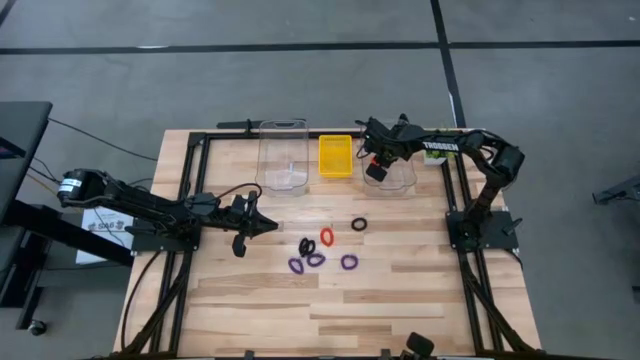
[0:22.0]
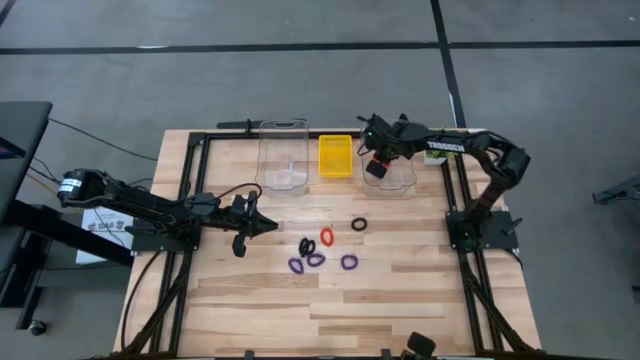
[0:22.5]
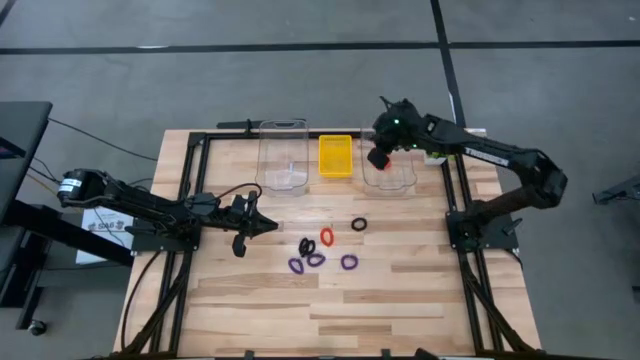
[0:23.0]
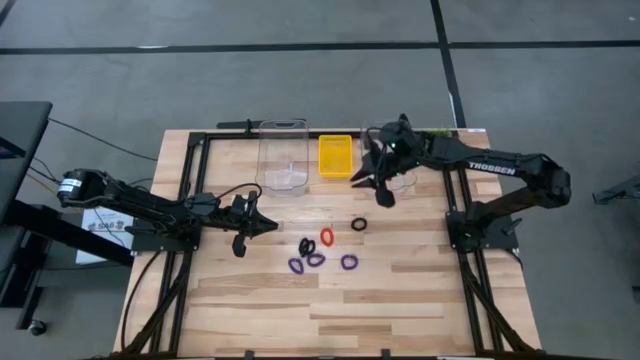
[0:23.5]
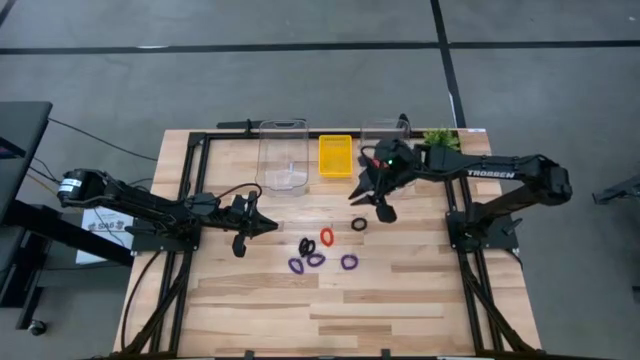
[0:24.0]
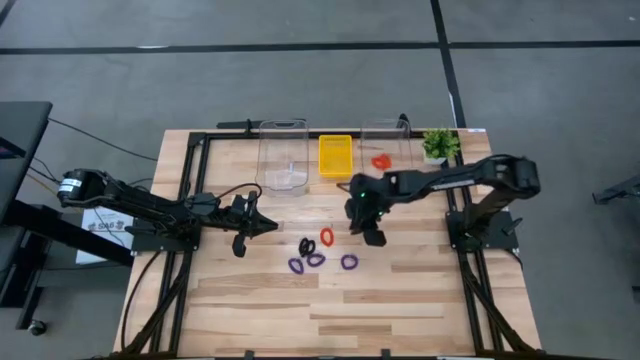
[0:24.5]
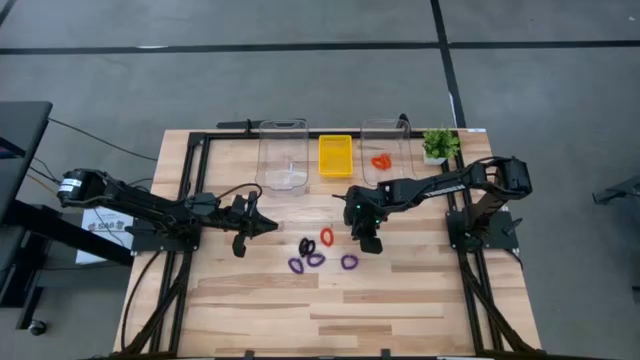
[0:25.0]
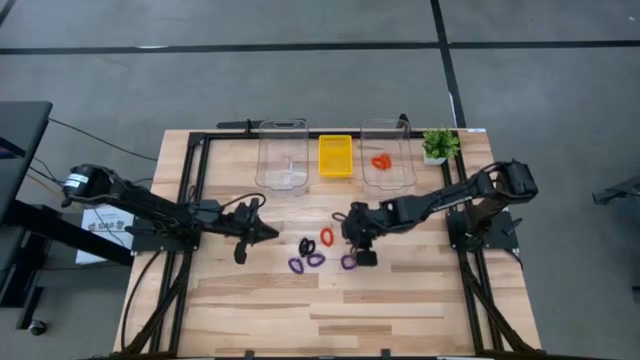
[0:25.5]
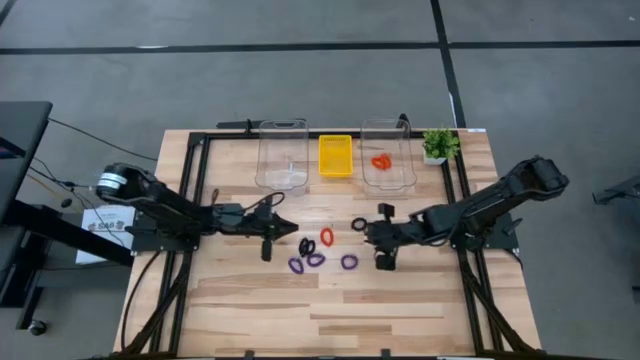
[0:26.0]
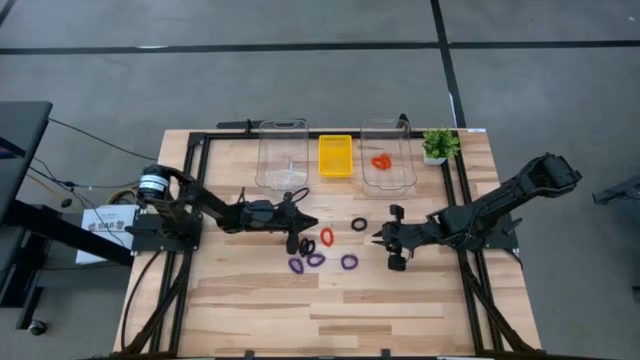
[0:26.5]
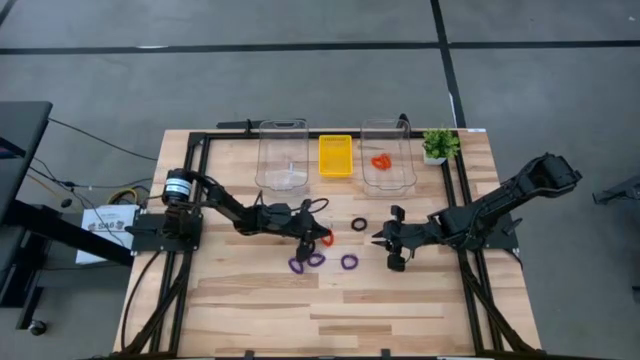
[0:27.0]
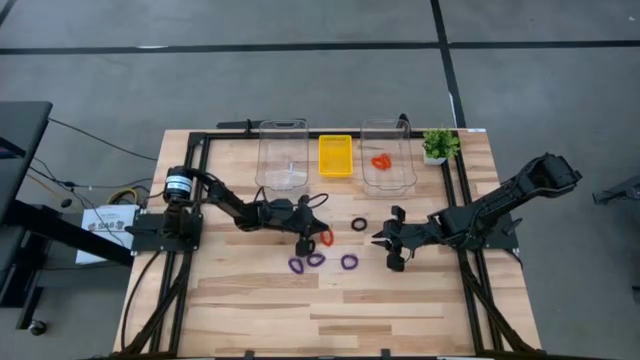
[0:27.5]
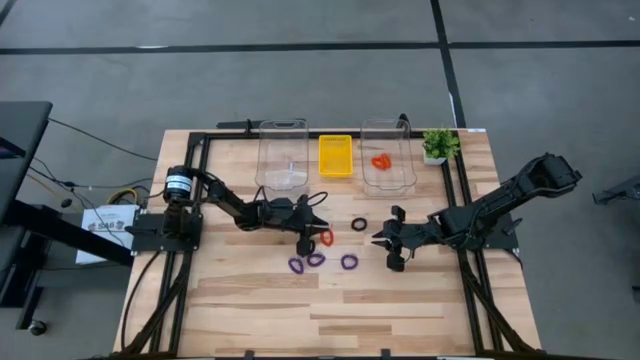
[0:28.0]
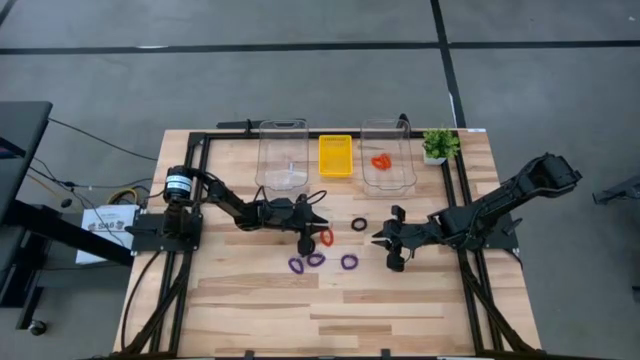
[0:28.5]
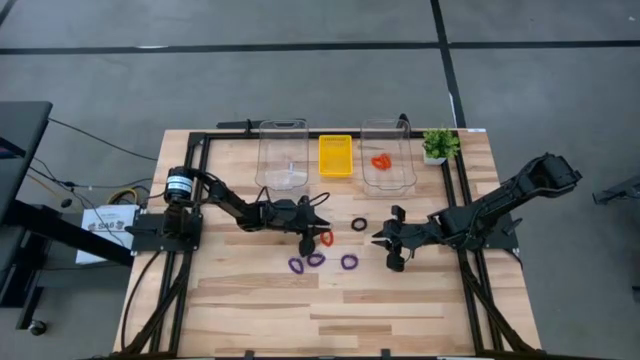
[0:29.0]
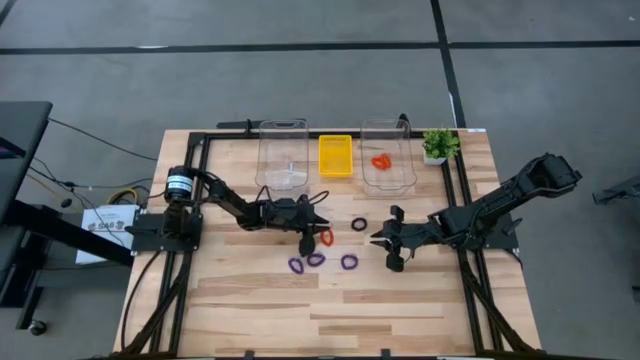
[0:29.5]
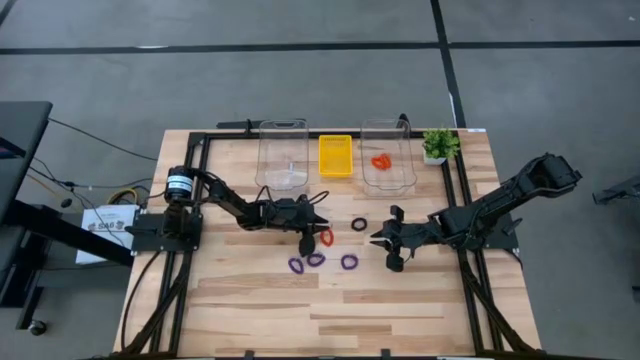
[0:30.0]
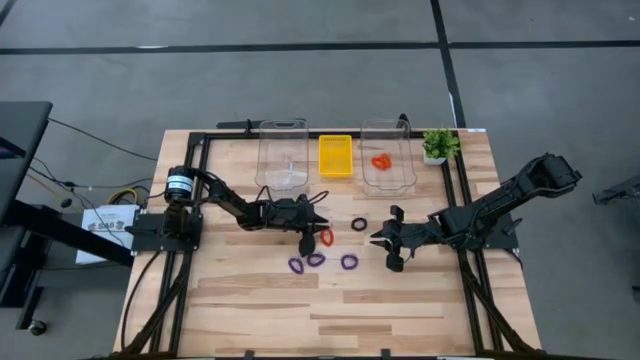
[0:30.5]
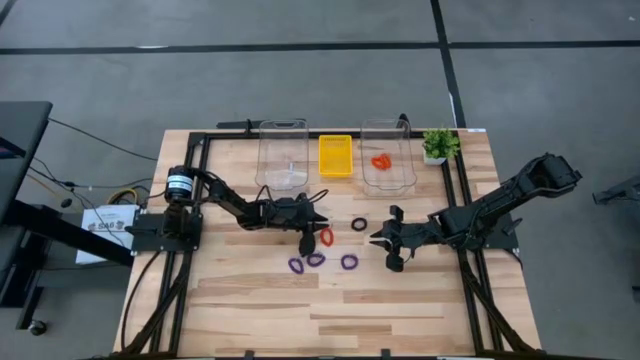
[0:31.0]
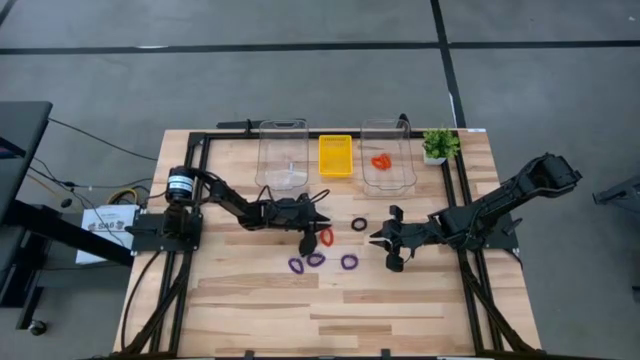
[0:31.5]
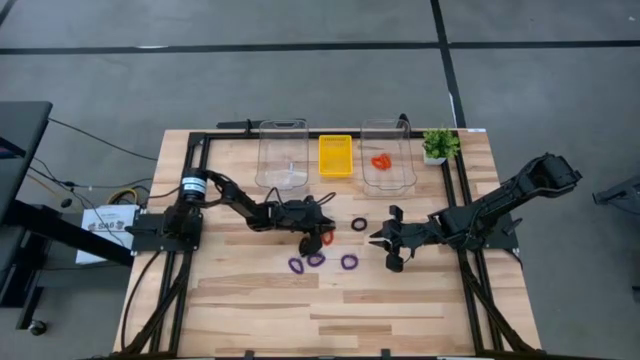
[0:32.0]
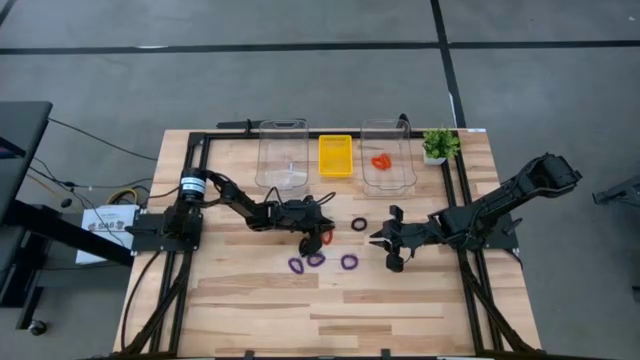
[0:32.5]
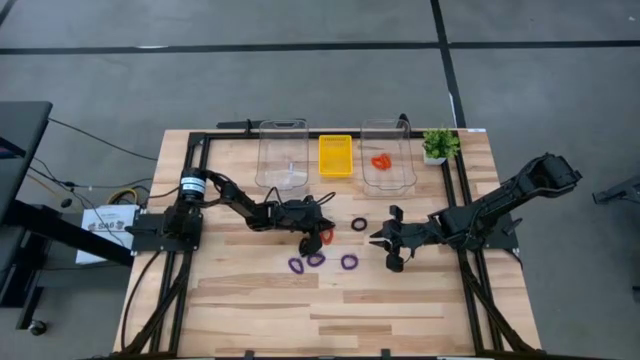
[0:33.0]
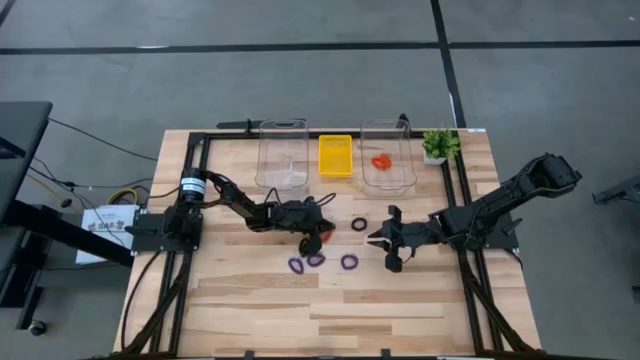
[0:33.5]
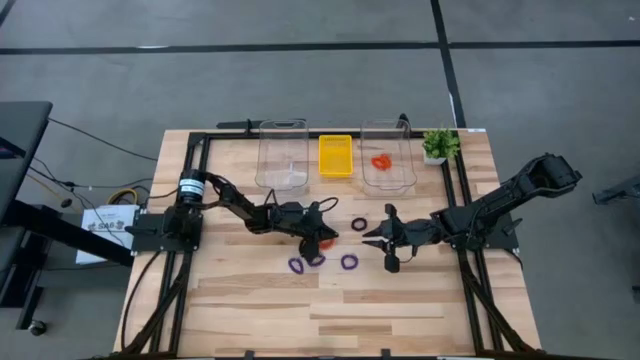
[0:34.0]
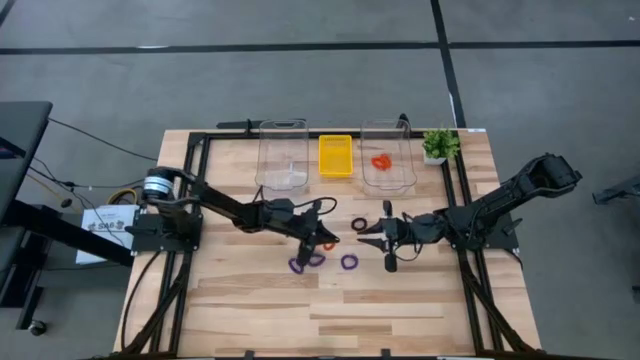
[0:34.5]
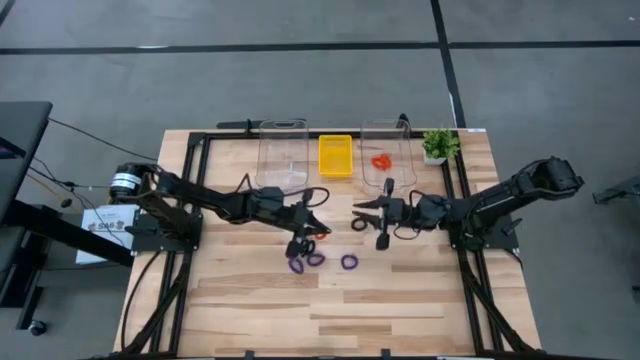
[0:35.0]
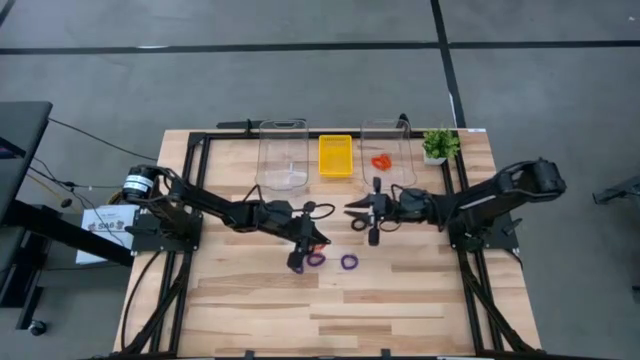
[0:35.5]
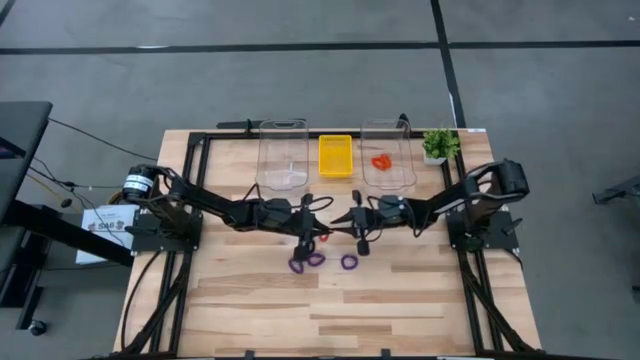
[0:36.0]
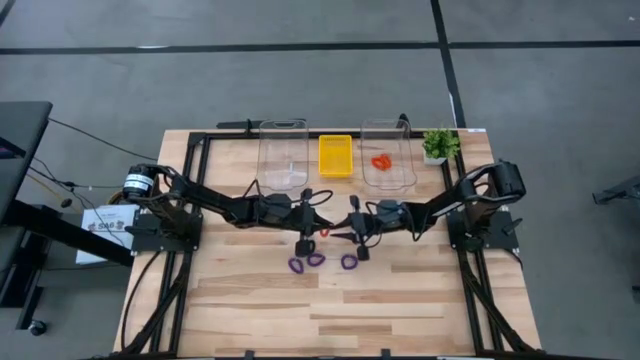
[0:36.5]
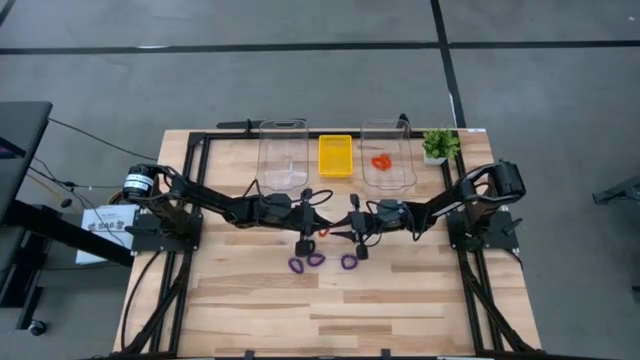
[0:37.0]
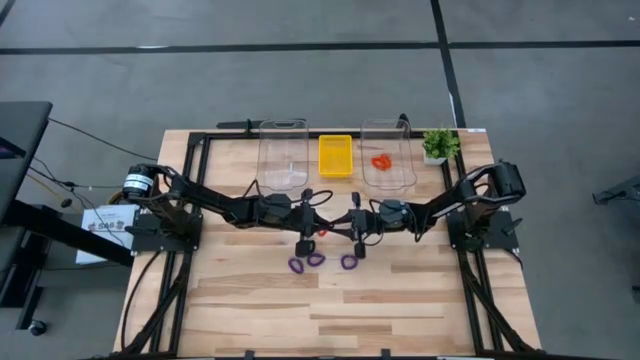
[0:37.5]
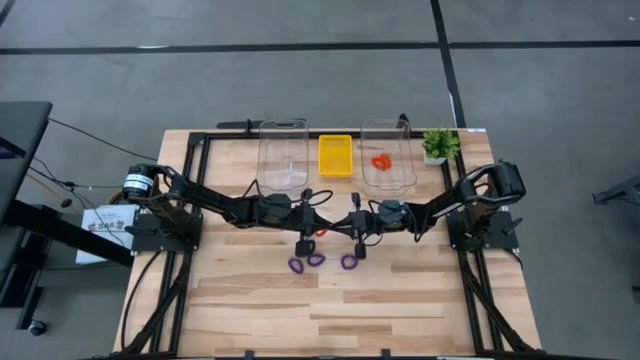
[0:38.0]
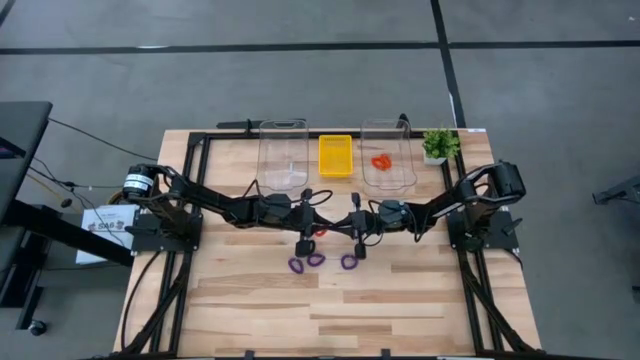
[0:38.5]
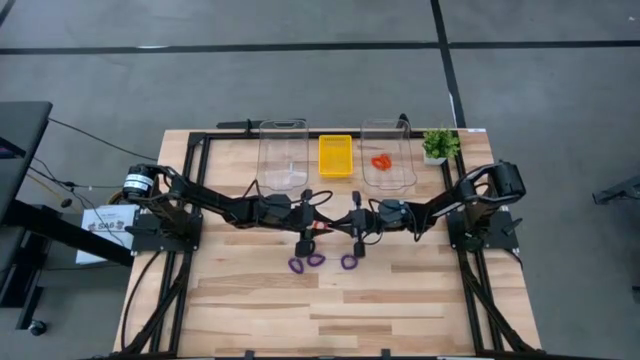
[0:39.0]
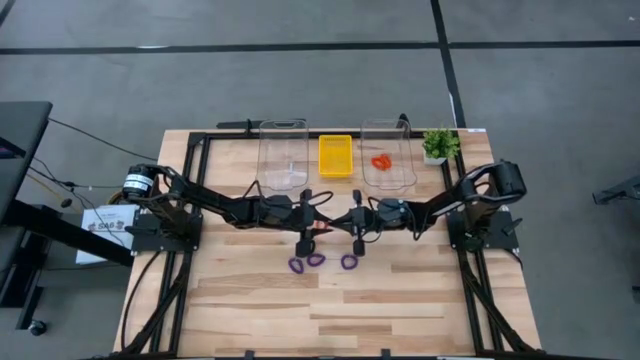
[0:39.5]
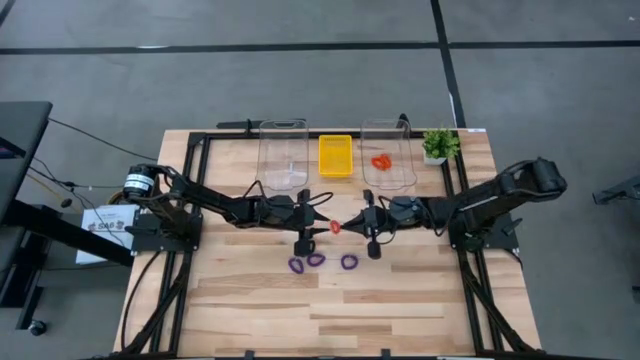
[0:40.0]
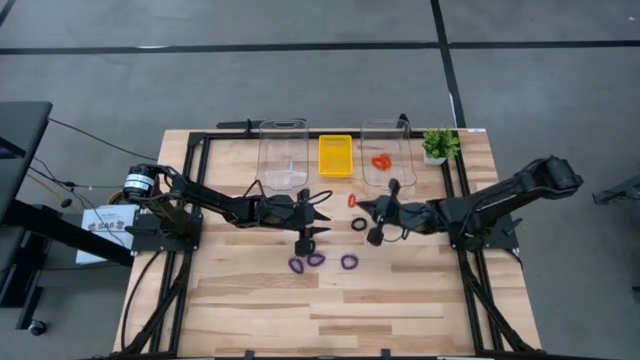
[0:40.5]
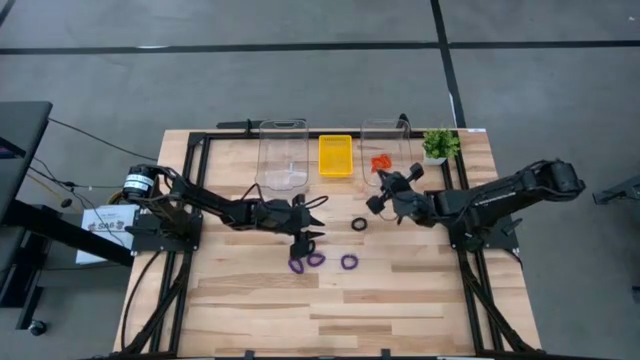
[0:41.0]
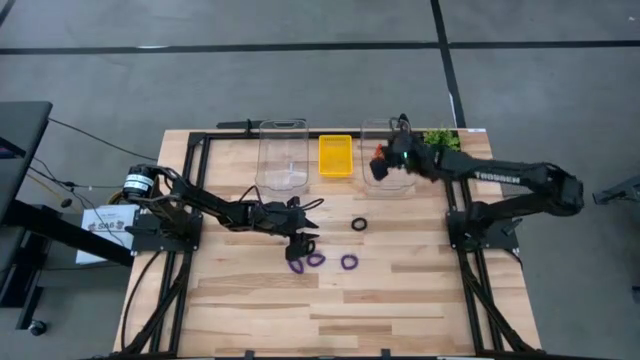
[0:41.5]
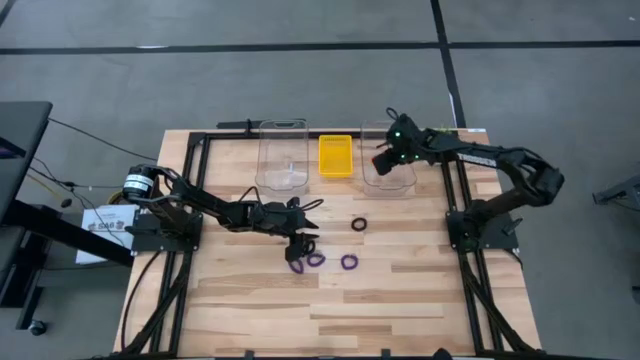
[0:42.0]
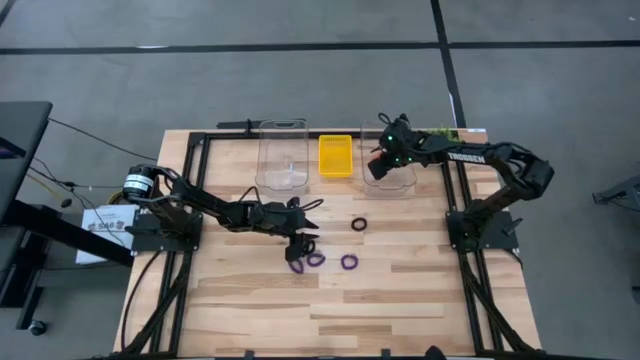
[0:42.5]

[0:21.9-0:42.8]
Task: Sort spring keychains
Put the orange spring keychain into the right transparent bin
